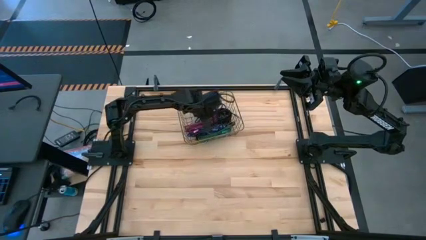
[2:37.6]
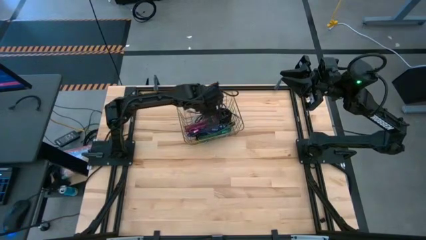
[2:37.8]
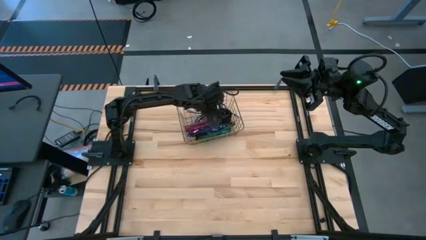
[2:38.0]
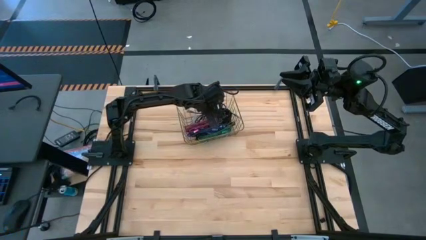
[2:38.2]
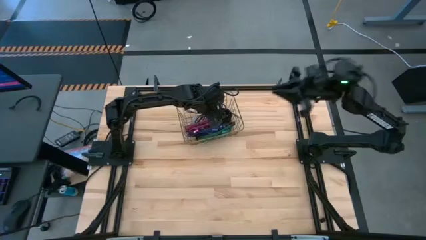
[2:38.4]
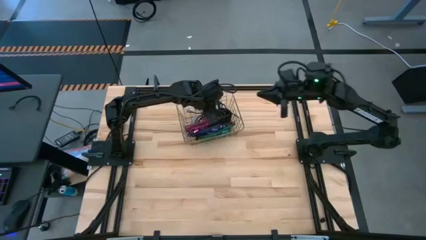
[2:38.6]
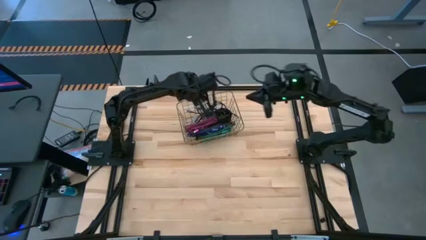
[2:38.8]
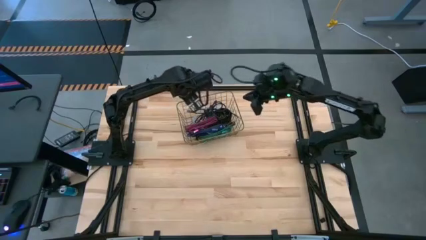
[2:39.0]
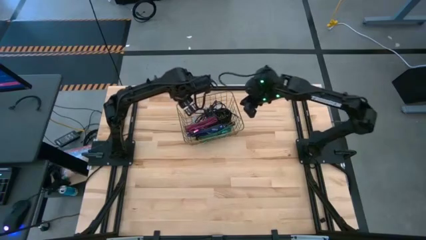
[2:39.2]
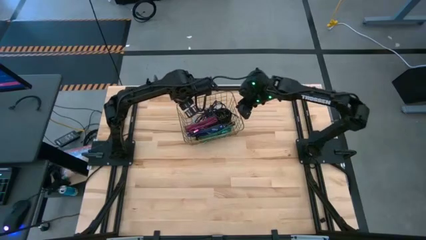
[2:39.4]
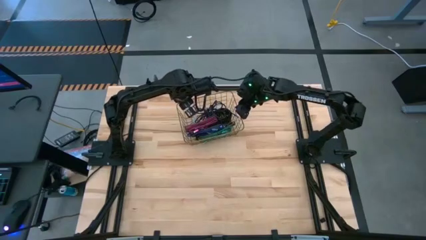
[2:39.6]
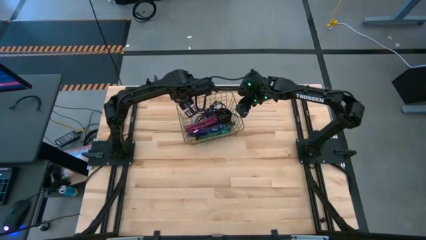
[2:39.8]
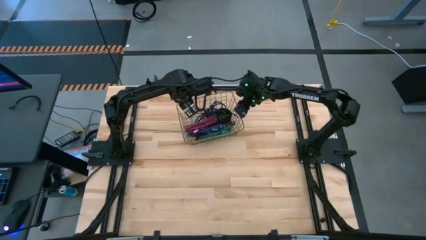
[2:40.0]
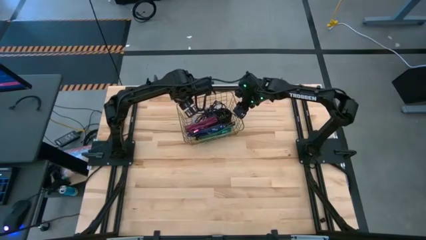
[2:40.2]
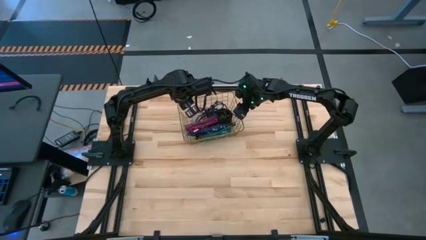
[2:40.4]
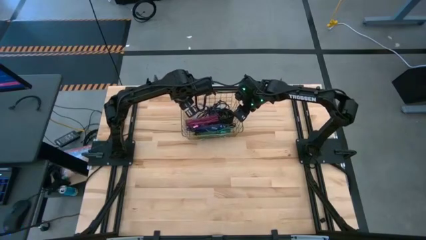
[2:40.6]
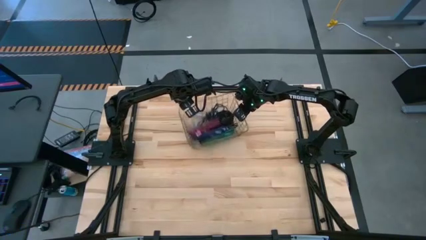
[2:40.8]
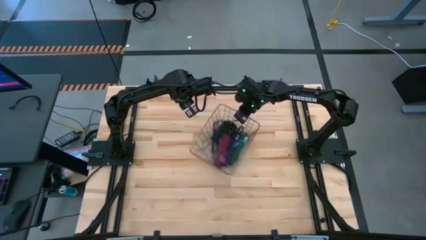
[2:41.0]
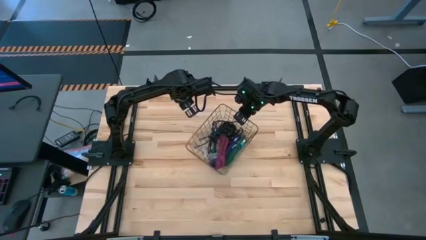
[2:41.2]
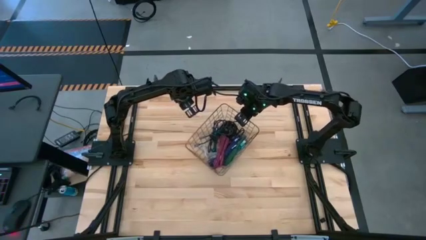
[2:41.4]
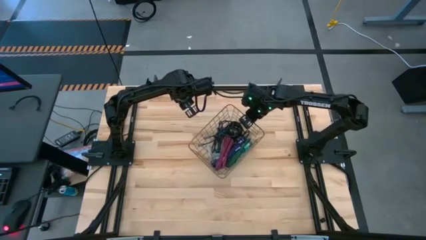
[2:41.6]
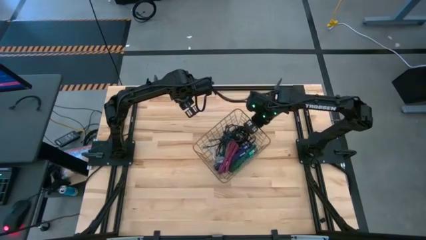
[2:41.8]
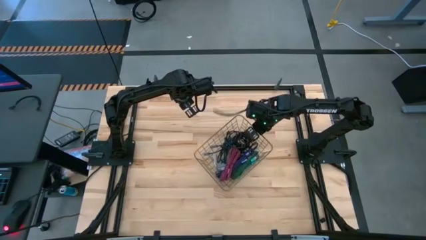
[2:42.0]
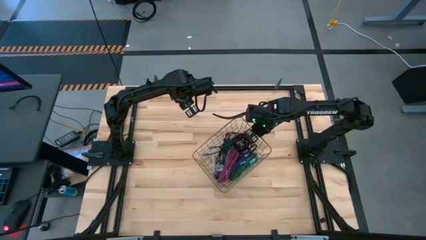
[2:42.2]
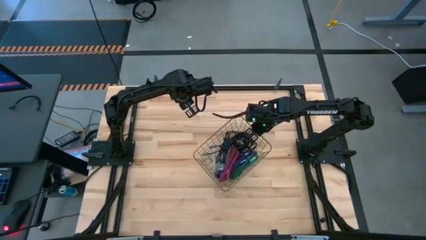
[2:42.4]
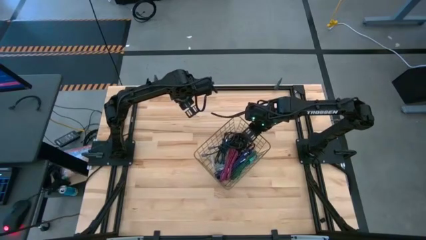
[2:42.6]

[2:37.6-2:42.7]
Task: Pick and place USB-C Cables
Adjust the wire basket

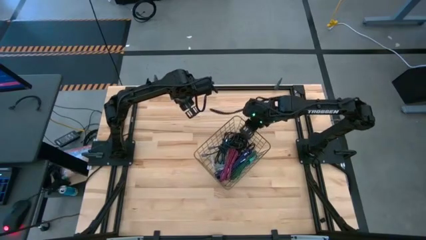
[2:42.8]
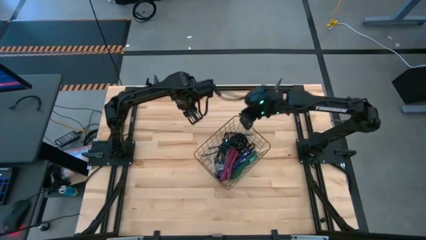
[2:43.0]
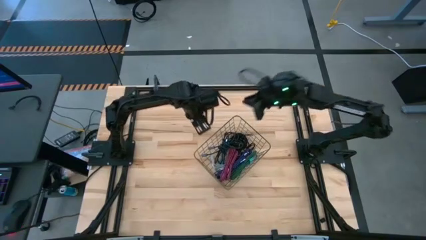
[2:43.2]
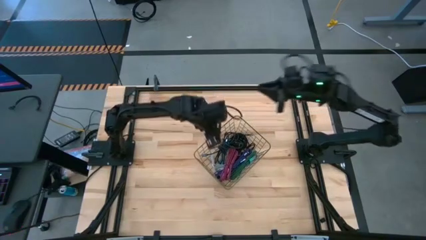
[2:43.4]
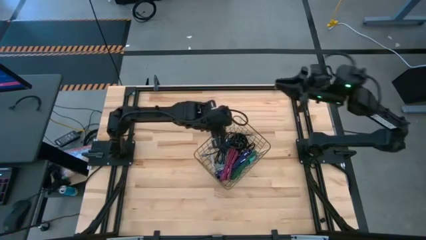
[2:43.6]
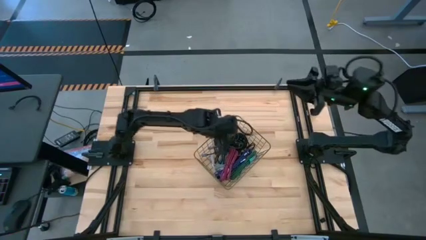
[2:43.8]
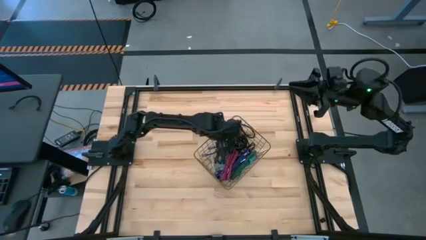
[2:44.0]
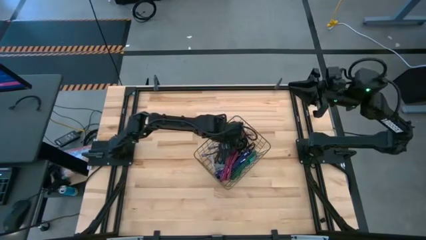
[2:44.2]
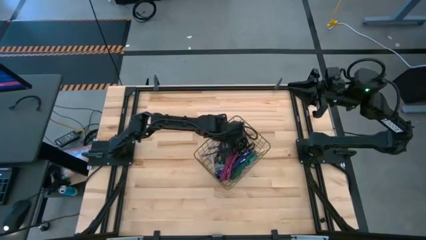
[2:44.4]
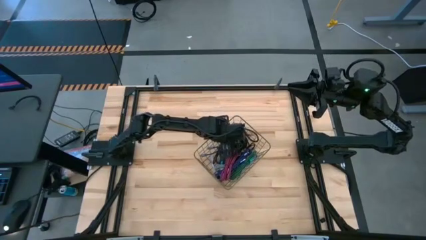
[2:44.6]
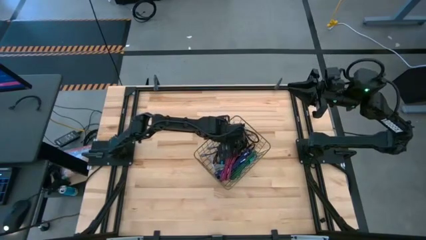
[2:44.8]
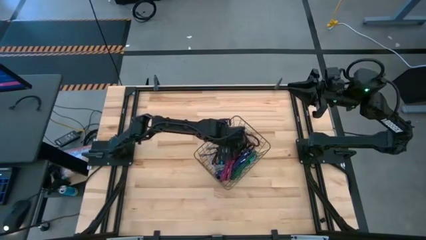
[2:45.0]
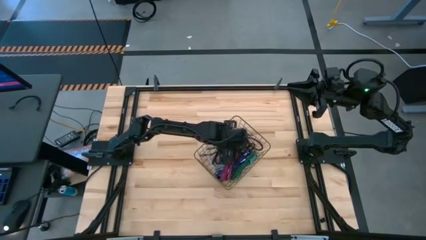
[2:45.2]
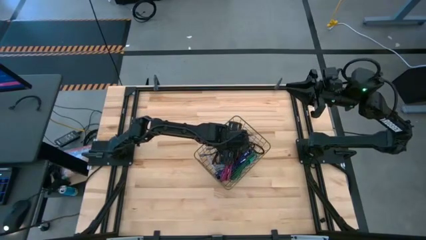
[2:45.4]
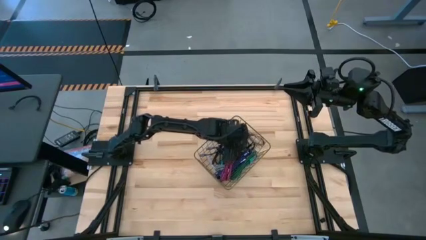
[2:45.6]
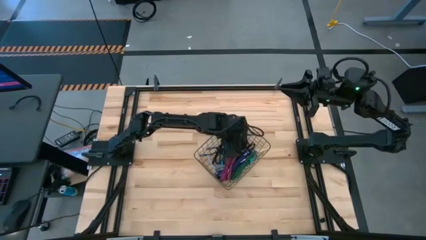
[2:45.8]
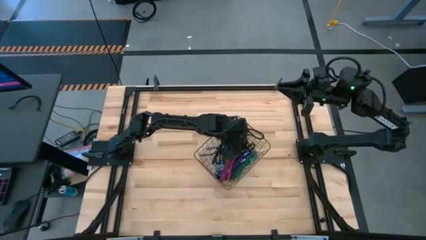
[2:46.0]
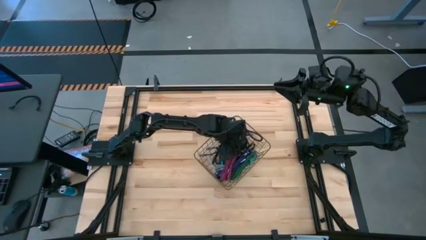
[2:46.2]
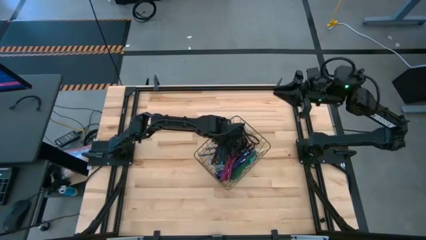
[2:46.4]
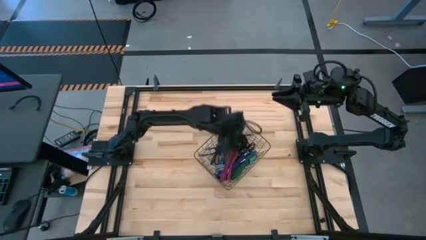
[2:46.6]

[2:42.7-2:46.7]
Adjust the black charger cable

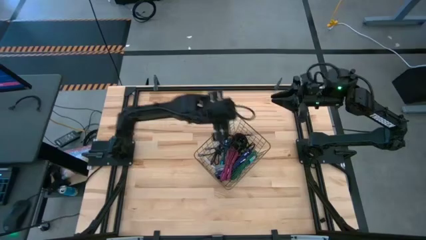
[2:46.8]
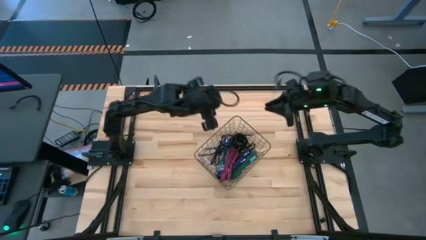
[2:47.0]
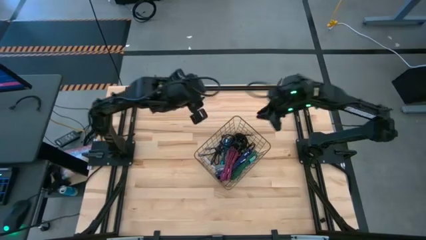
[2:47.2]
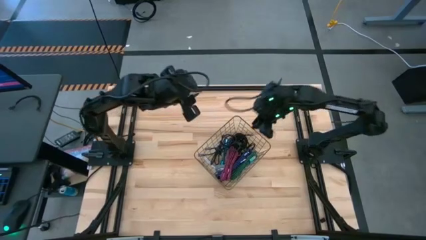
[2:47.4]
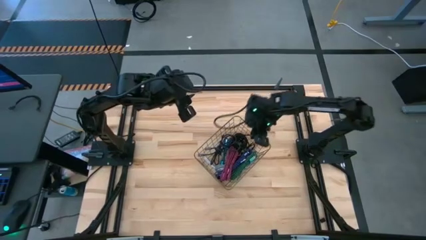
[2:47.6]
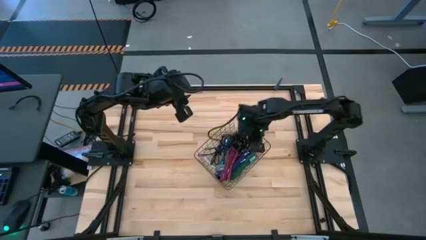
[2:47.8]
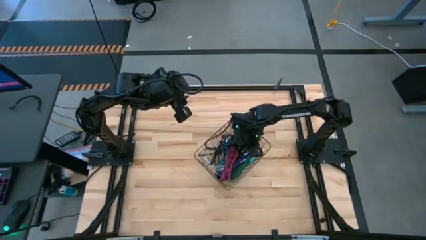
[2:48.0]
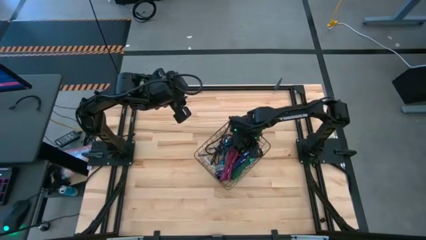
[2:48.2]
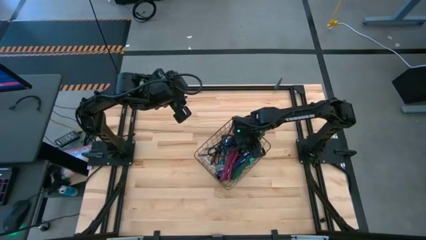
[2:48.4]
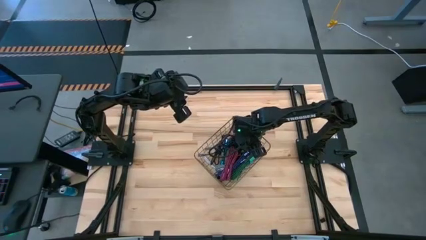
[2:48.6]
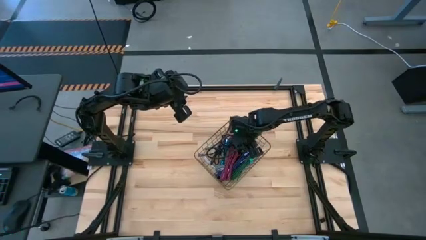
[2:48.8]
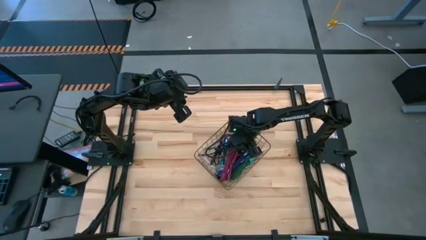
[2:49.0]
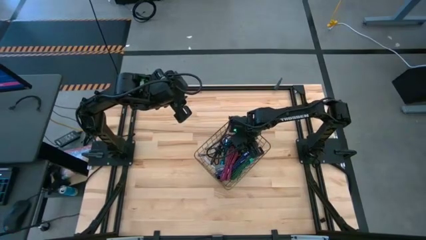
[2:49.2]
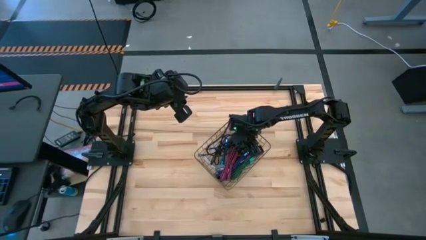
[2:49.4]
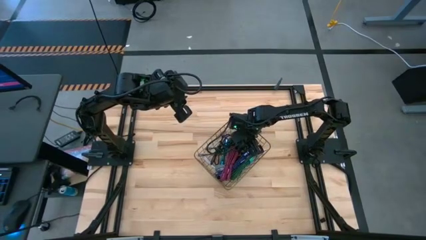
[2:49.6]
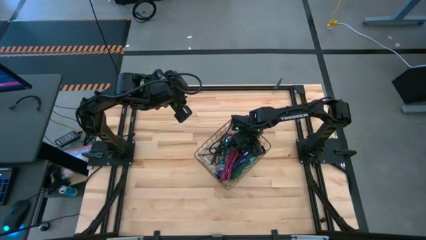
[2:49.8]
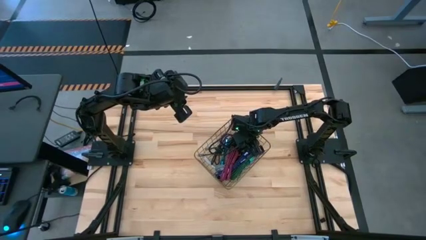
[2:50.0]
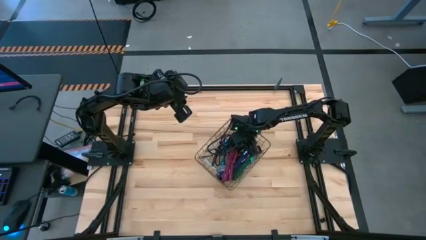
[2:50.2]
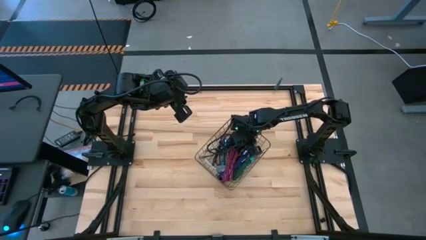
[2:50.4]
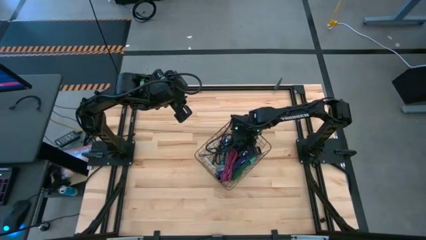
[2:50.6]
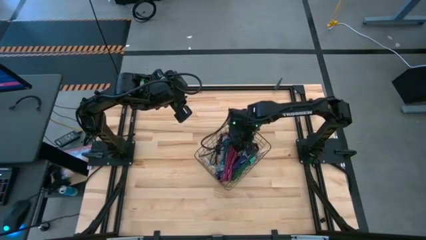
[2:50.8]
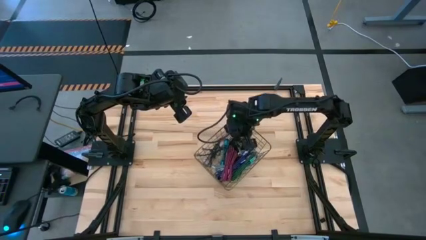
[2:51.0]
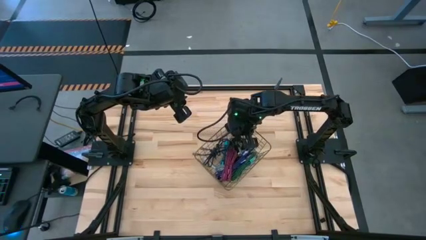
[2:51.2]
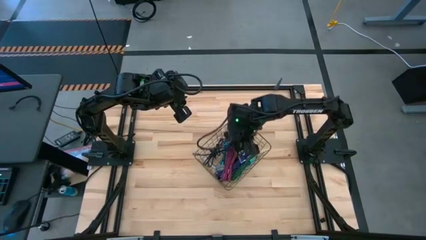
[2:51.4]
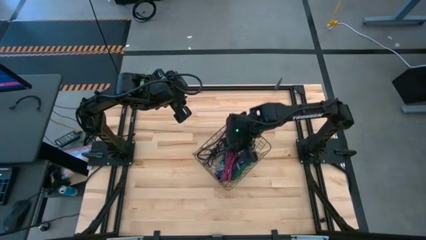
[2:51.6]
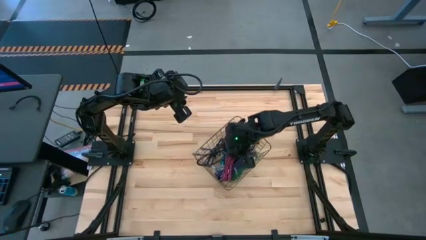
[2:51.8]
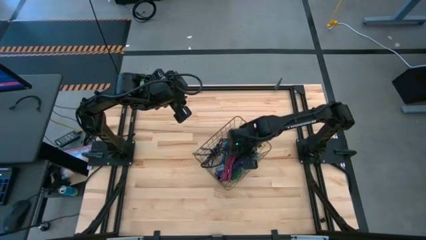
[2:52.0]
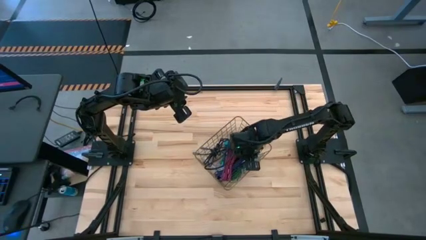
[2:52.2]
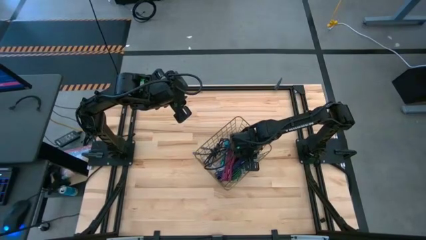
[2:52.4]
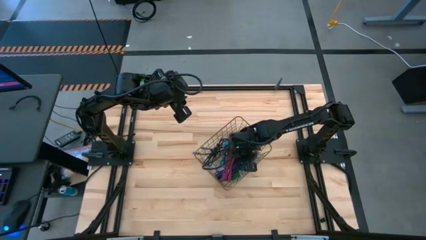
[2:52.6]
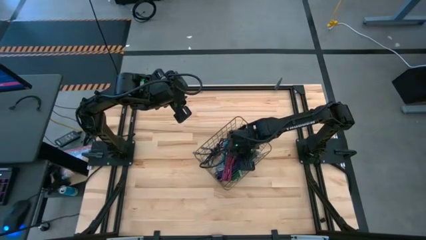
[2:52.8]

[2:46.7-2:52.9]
Adjust the black charger cable

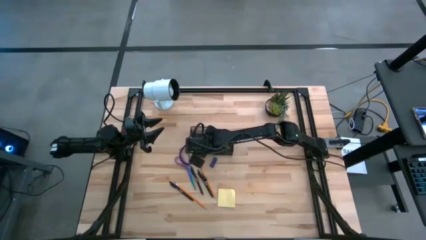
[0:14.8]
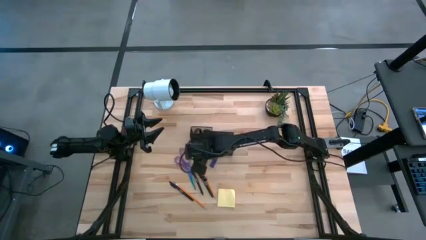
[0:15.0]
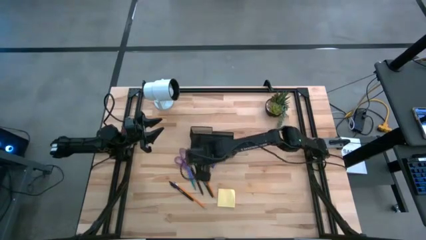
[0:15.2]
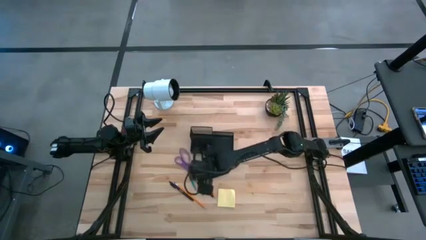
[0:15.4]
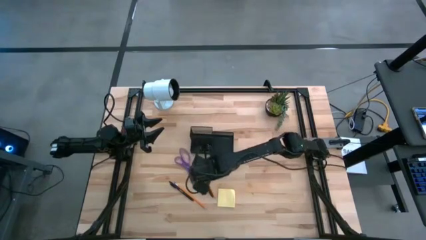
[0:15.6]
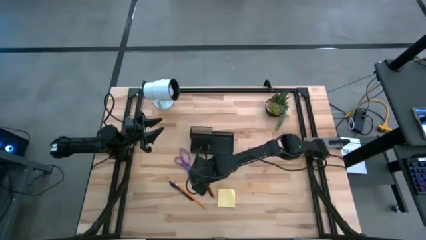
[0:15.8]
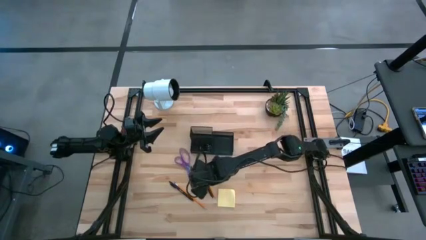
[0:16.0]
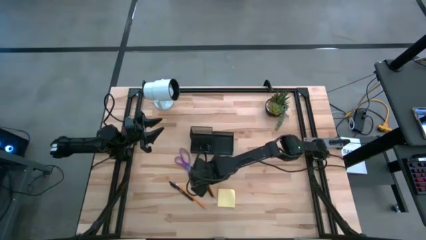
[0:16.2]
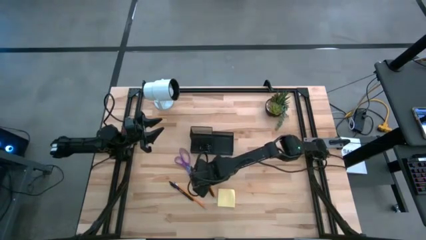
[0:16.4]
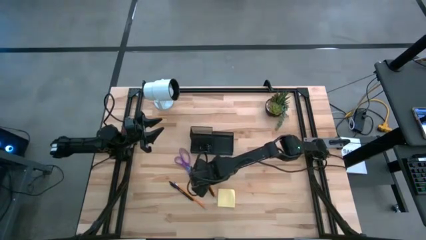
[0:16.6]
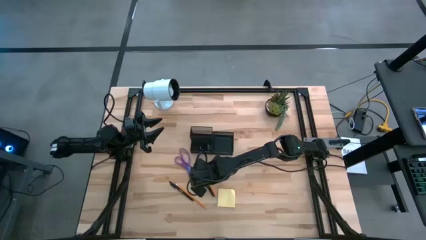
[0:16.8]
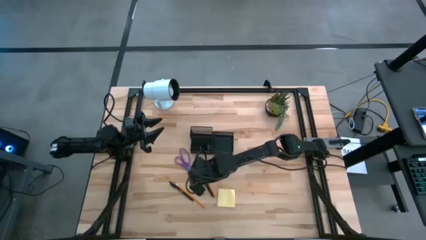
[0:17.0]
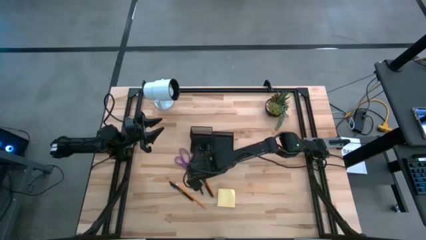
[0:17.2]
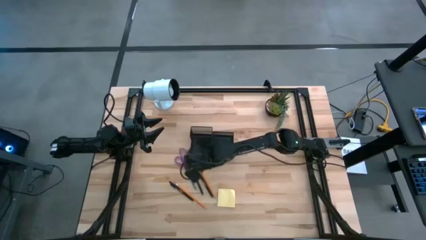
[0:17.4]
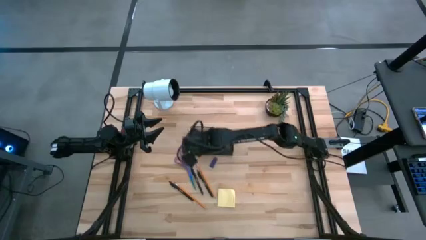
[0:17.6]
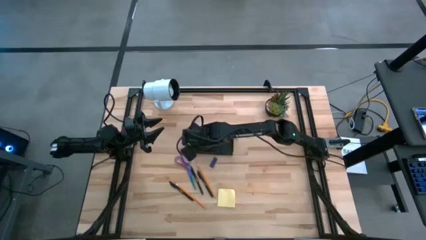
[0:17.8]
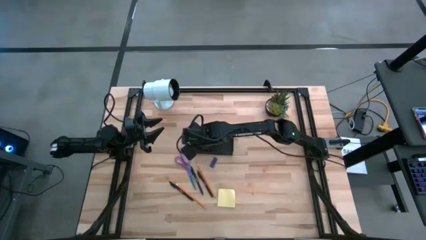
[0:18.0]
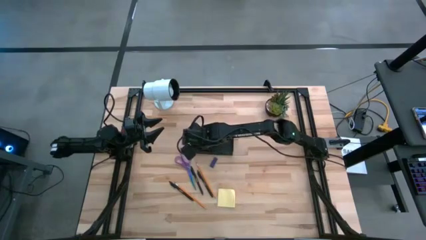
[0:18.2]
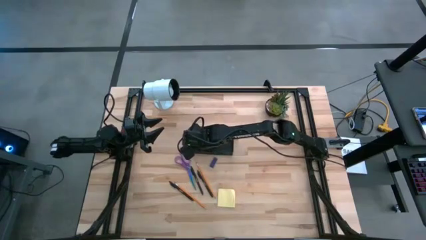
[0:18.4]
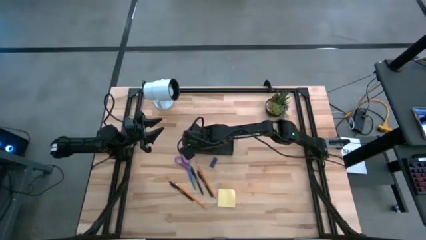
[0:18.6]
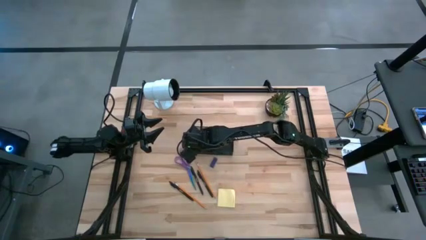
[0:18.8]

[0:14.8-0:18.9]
Task: Pick and place office supplies into organizer
Put the black binder clip into the black desk organizer
